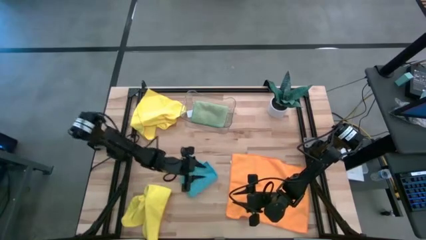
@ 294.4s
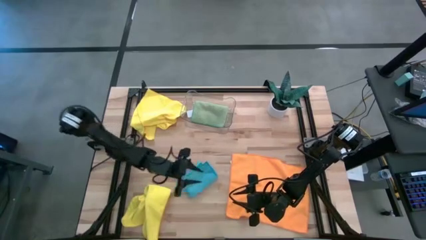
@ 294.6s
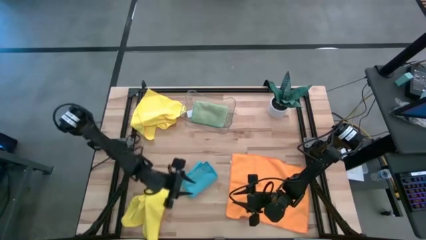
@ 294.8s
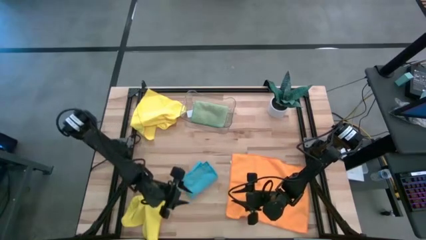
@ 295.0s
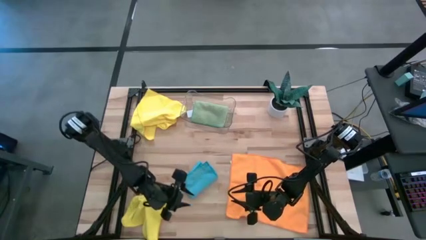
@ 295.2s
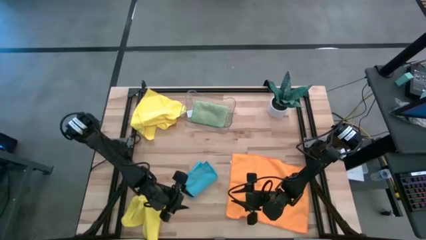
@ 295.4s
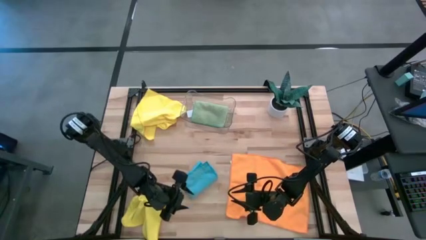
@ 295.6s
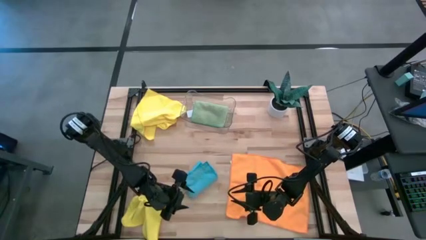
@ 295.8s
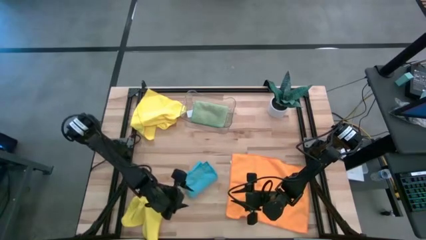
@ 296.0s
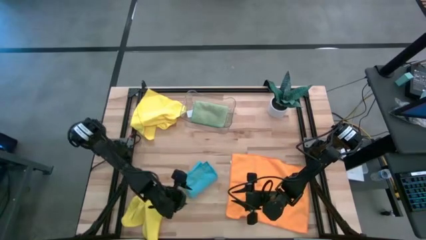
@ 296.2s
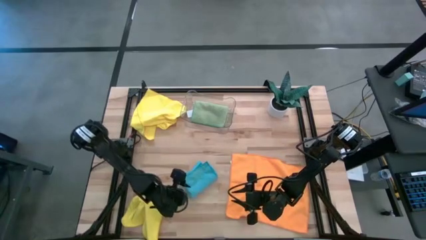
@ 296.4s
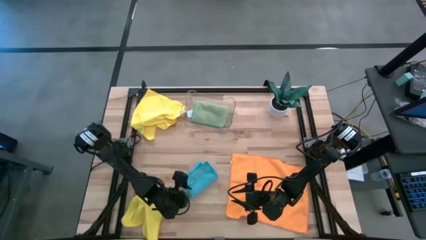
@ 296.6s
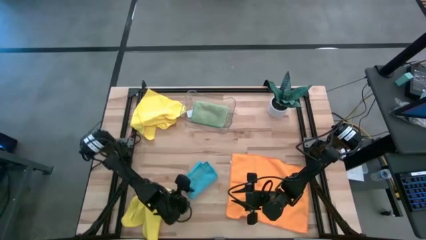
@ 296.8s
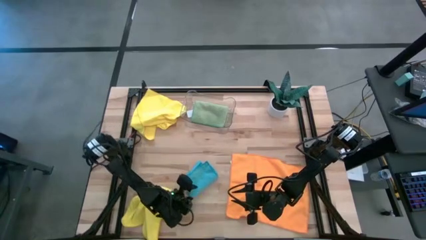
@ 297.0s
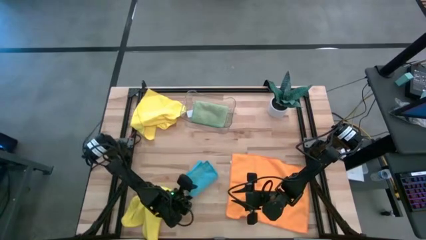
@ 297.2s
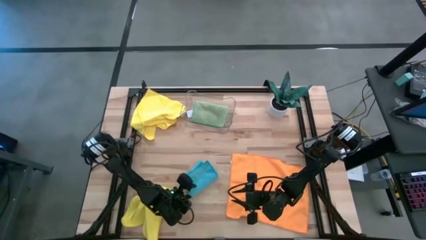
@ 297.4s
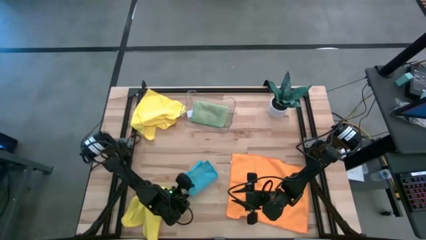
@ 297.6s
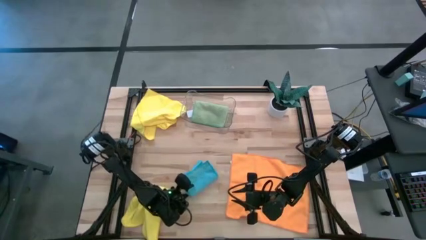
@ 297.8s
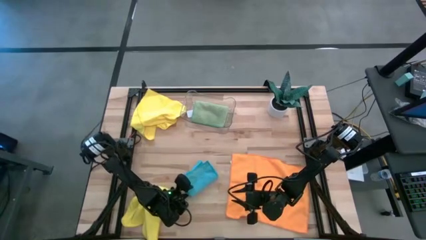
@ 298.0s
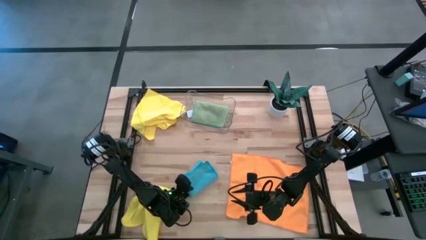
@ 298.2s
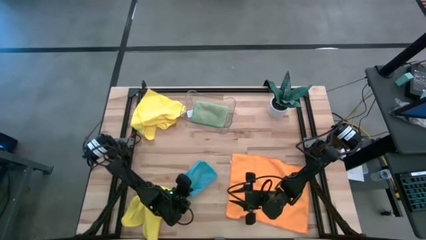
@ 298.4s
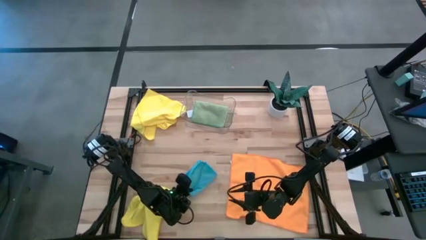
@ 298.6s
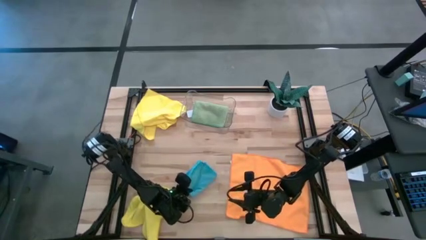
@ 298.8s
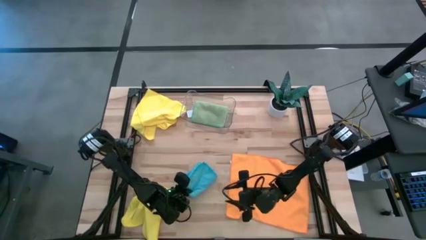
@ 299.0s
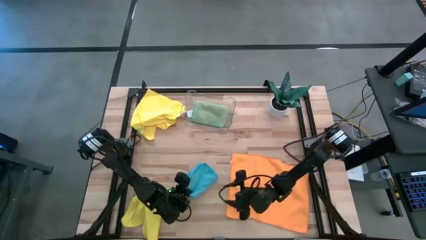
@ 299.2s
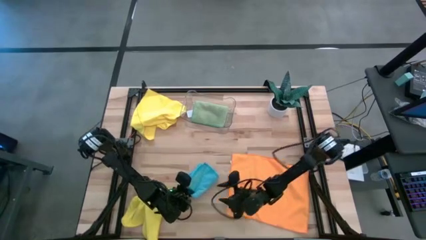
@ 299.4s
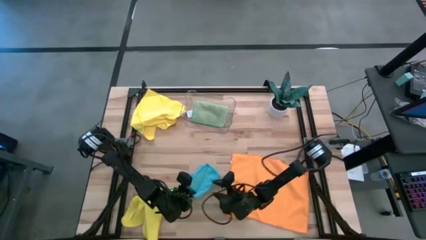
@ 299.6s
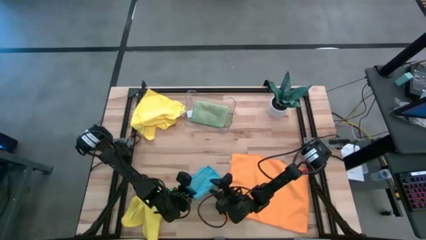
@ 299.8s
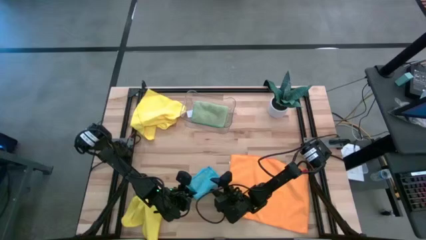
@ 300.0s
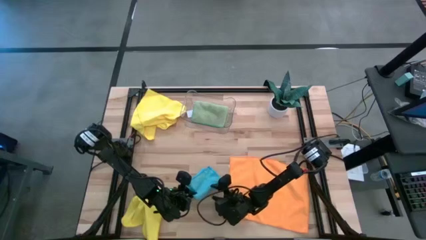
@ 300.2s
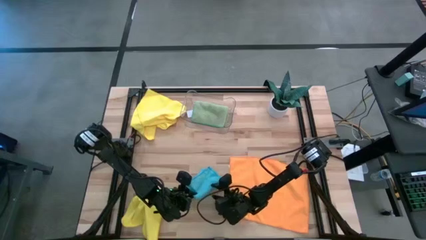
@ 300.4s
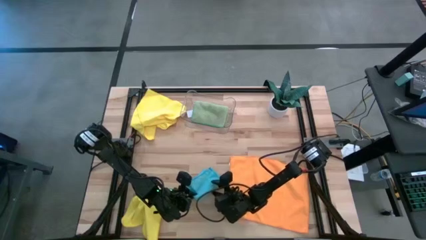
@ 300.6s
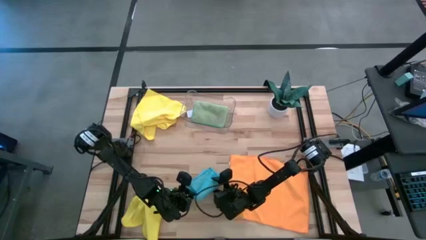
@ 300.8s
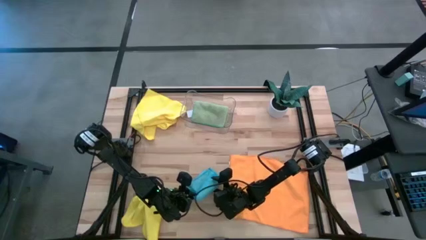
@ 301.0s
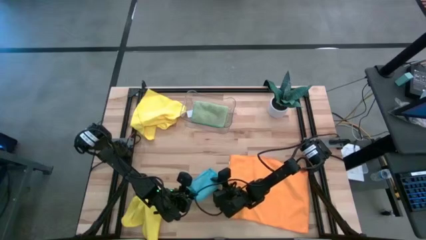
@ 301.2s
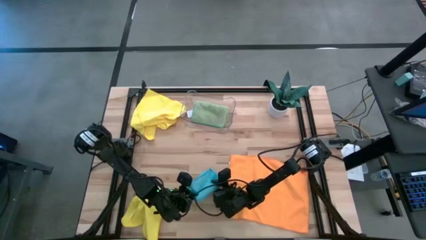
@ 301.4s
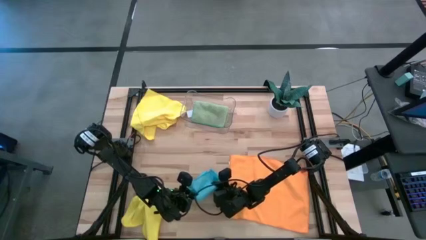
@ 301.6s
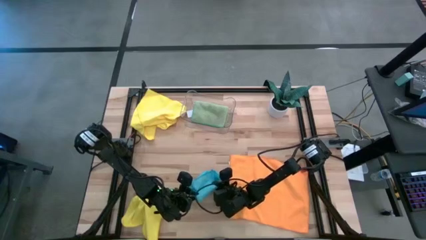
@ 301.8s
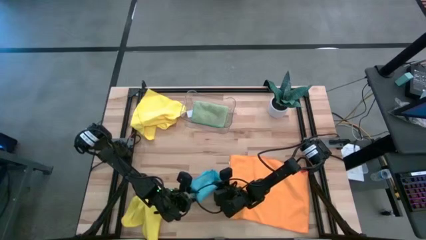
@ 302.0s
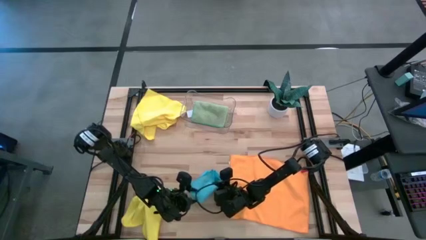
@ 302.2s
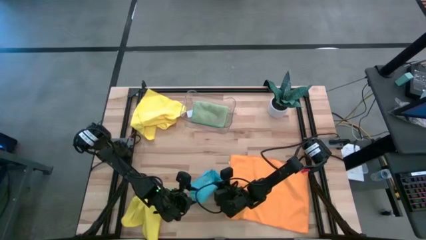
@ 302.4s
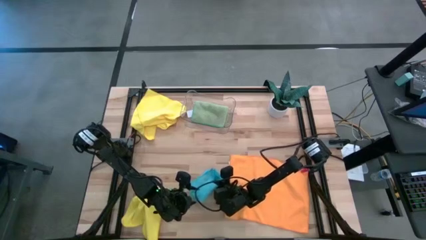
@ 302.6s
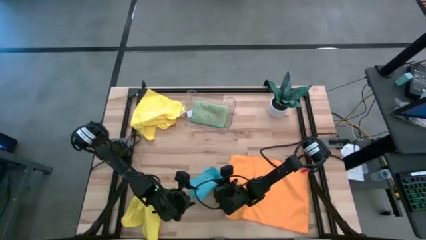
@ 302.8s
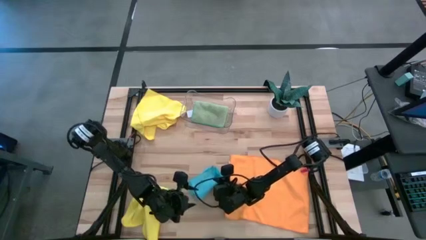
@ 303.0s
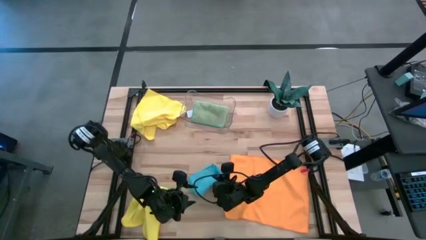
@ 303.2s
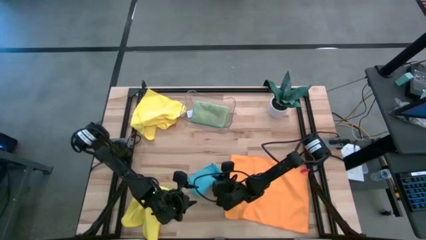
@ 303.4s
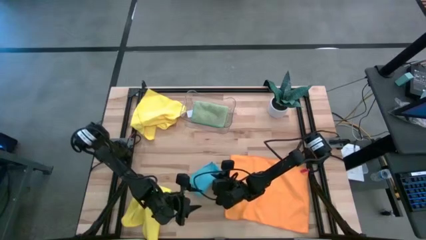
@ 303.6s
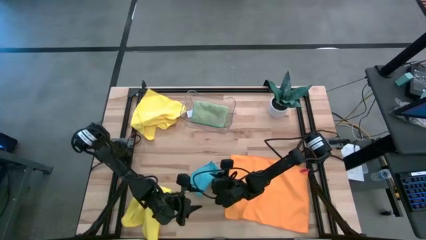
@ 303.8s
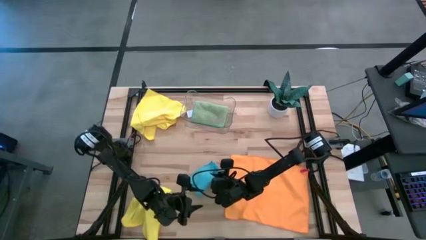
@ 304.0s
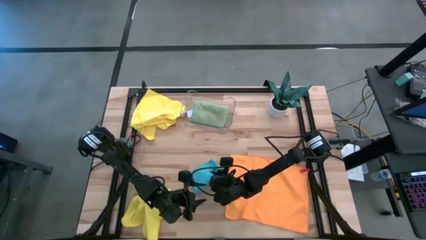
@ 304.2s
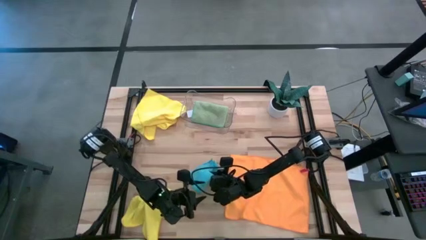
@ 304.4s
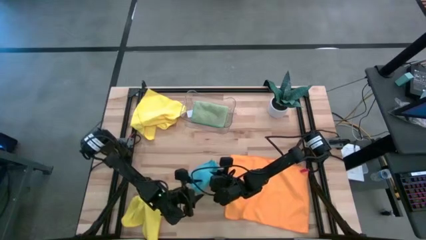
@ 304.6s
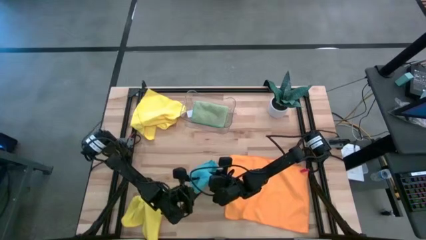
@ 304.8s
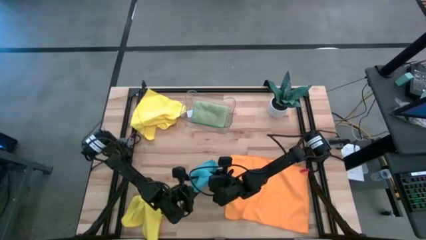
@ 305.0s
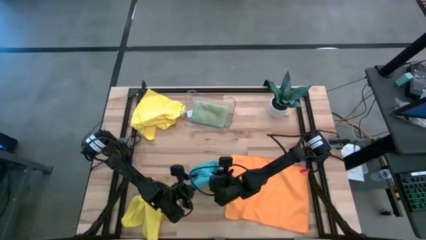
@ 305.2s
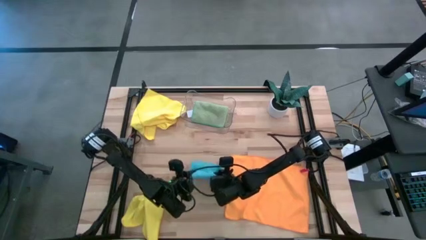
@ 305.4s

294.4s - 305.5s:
Task: Fold microfiber towels
Put the blue folded towel into the transparent bin

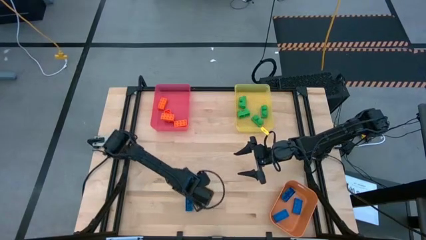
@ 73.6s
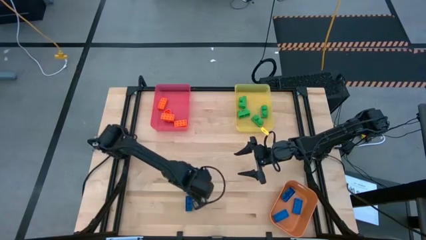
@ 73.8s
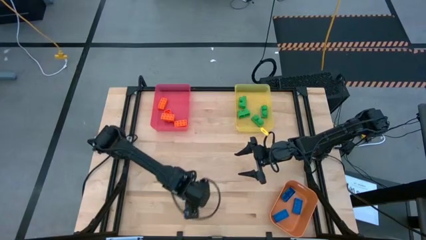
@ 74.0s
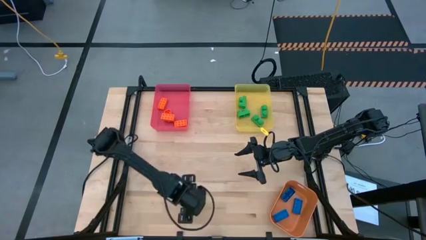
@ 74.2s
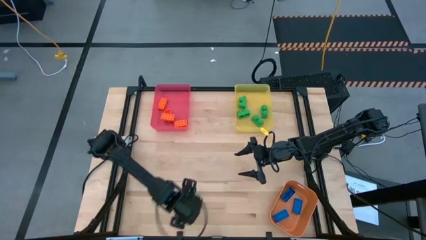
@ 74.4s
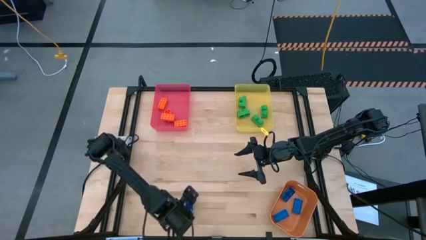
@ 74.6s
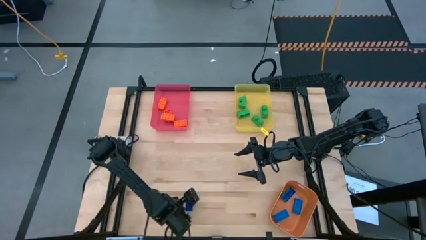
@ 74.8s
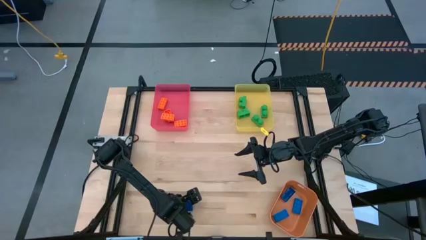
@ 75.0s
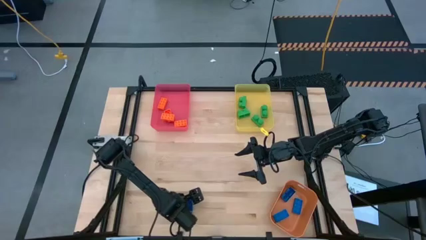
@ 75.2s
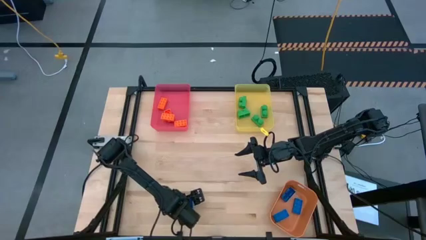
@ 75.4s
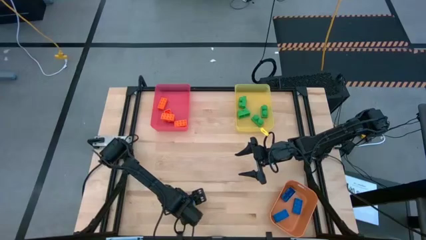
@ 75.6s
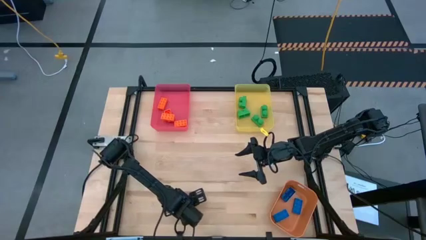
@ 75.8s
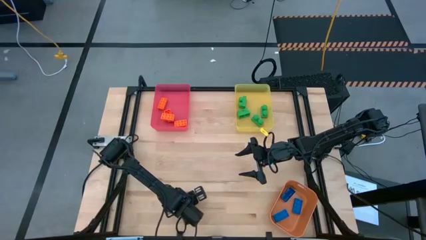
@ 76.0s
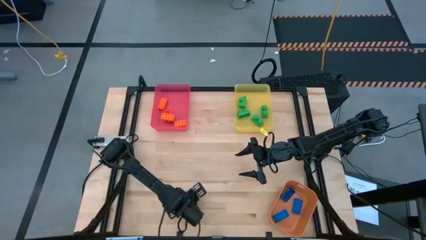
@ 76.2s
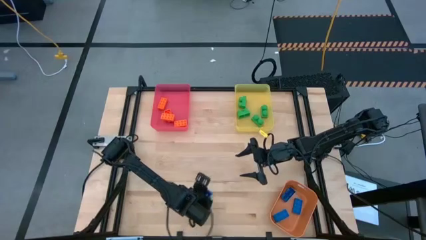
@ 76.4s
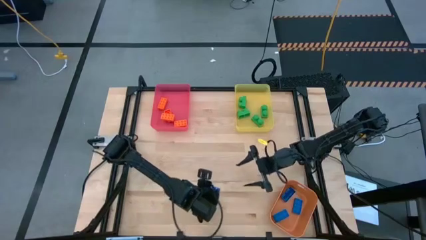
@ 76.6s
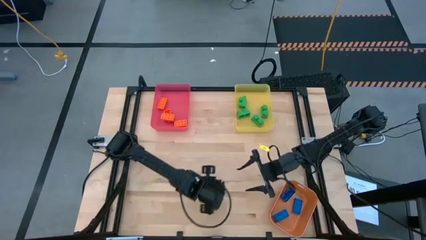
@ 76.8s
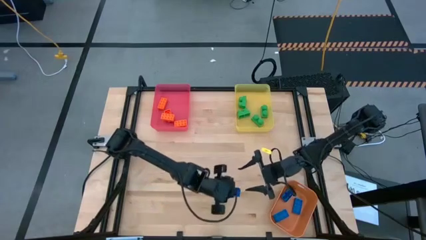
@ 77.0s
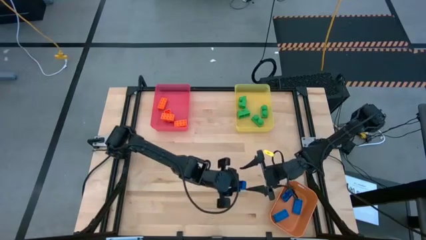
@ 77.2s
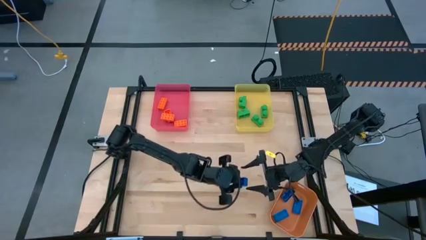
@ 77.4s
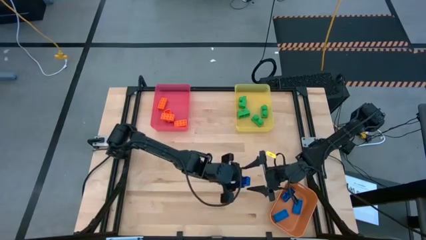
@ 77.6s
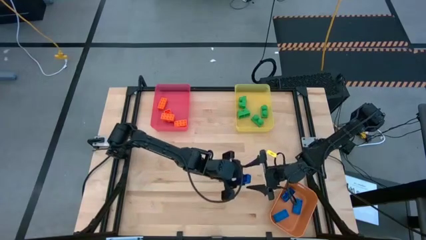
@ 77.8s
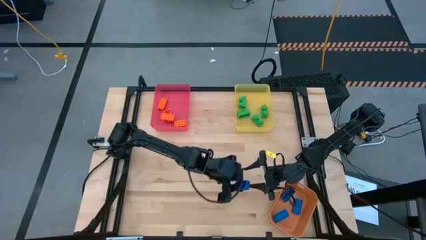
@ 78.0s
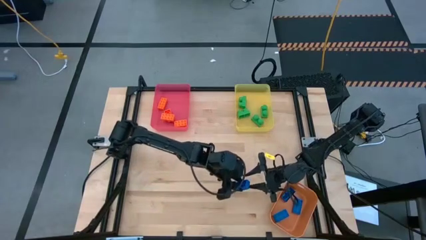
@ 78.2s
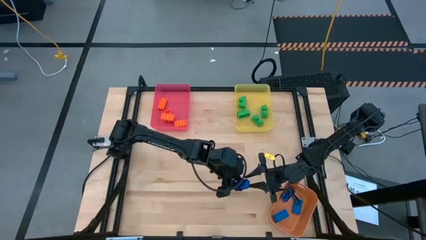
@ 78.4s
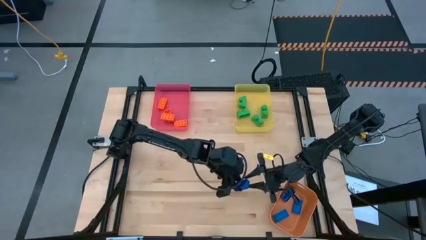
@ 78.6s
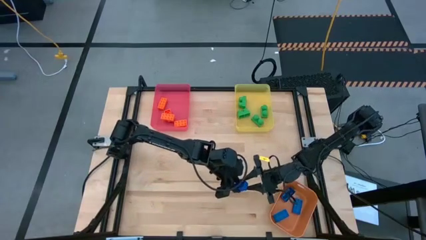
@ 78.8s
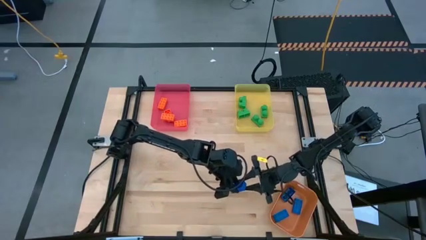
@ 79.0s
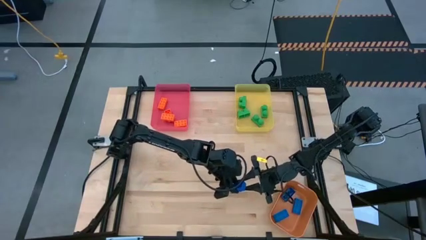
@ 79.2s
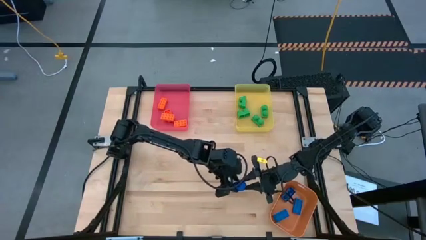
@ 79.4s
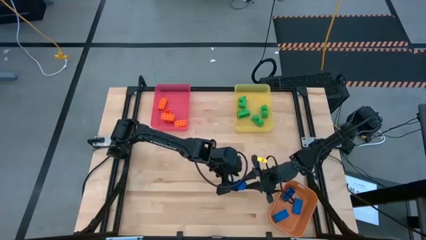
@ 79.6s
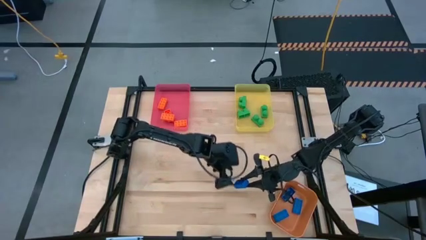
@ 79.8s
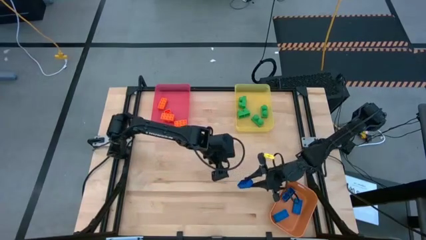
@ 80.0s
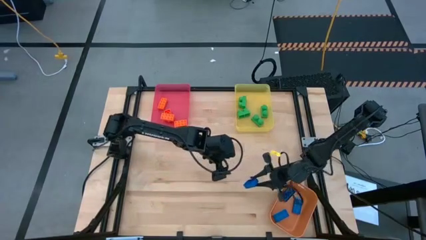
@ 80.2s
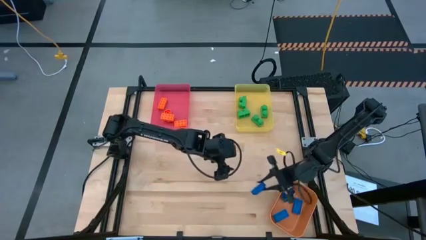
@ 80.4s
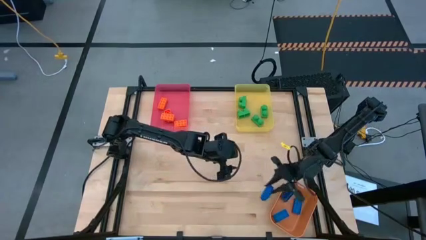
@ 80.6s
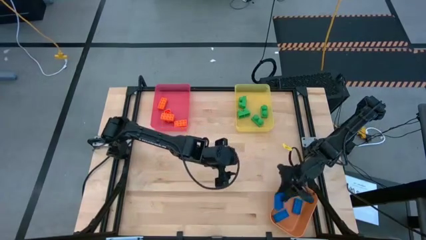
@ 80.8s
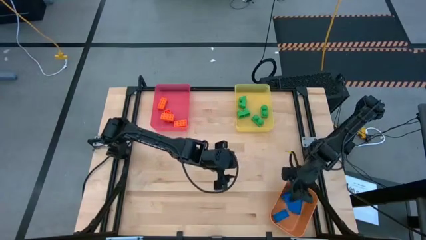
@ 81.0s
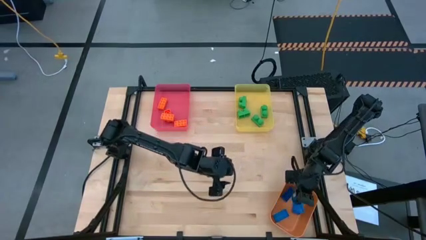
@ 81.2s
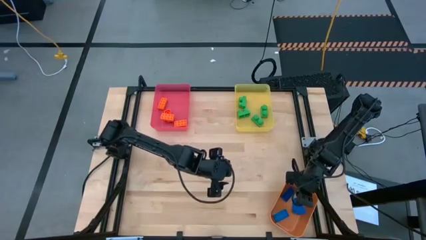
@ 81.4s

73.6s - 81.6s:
Task: Sort & place blocks by color
Put the blue game piece into the orange bin
